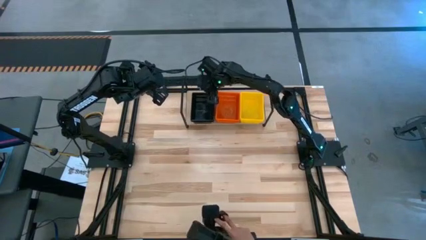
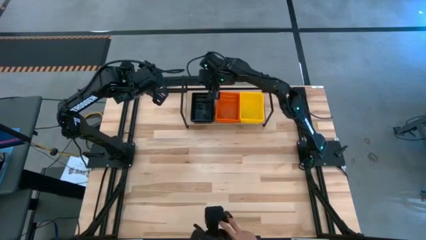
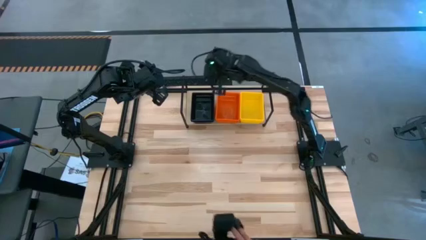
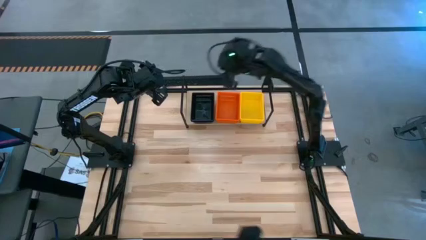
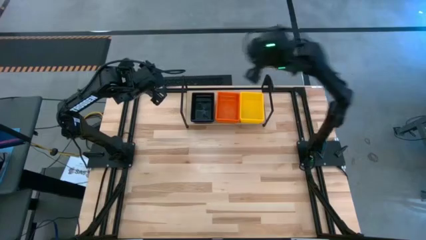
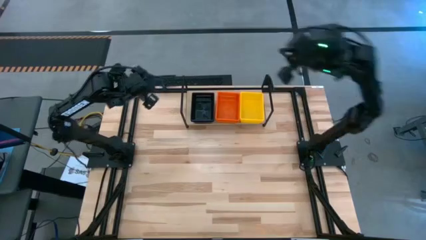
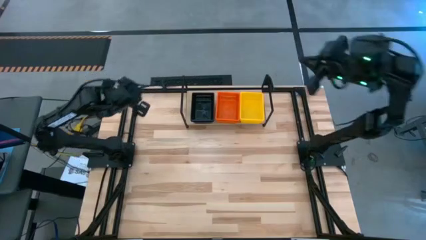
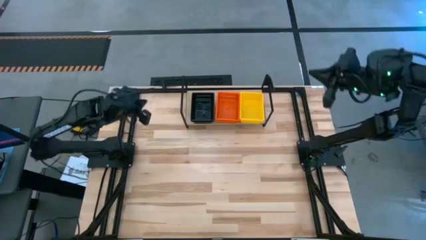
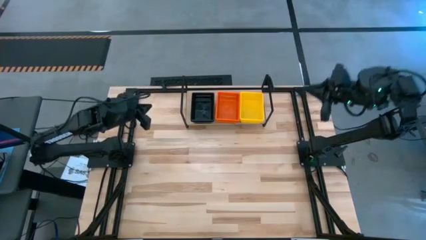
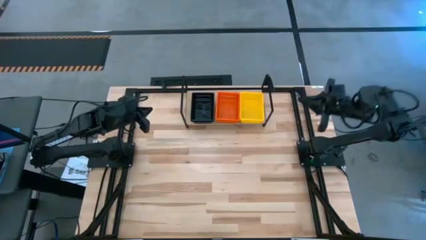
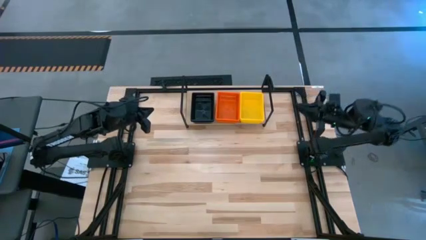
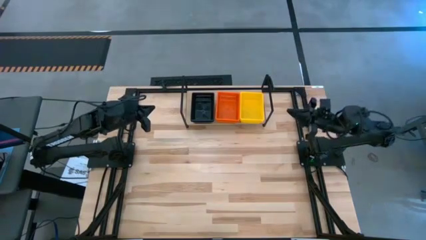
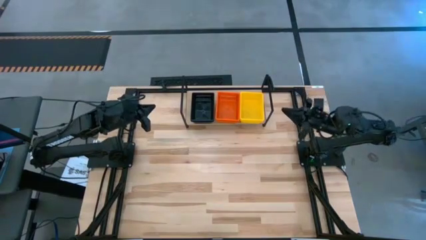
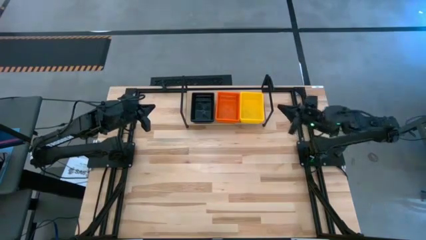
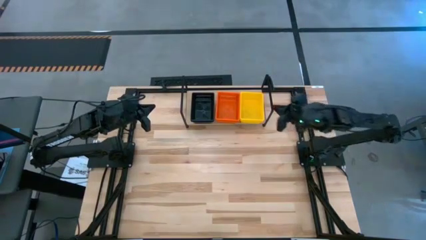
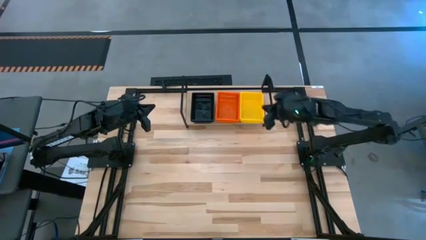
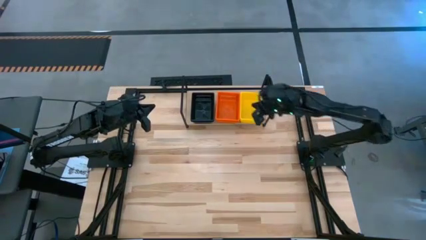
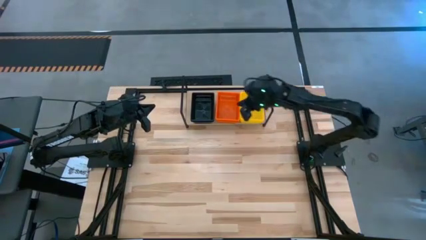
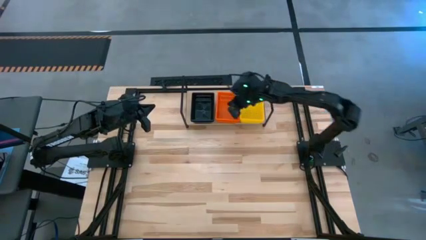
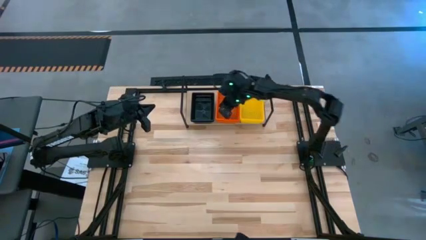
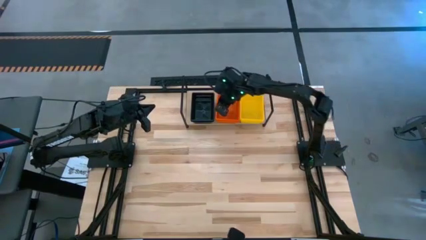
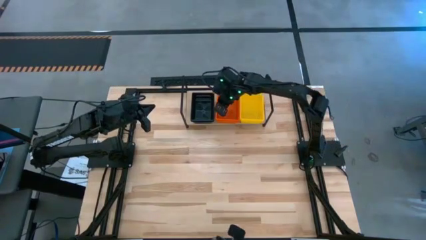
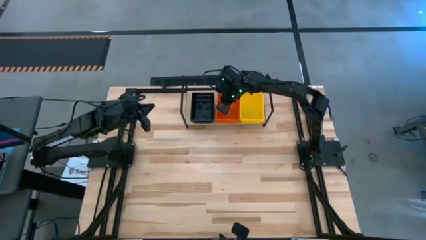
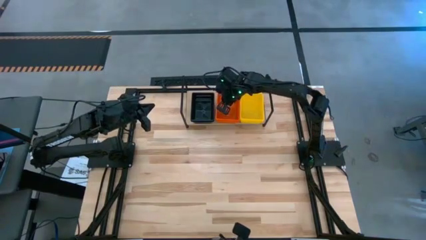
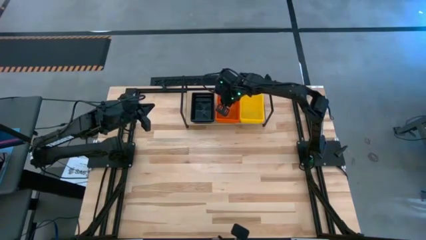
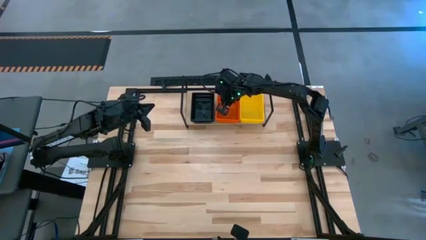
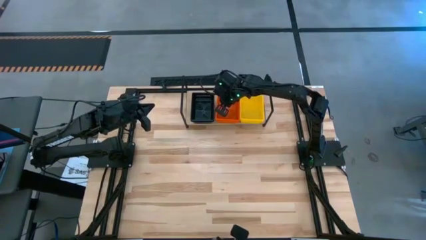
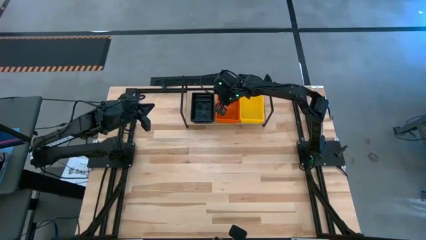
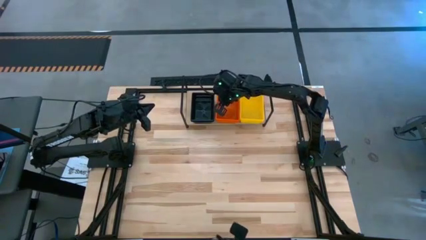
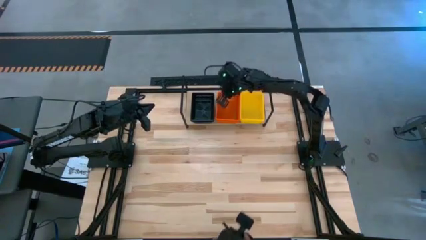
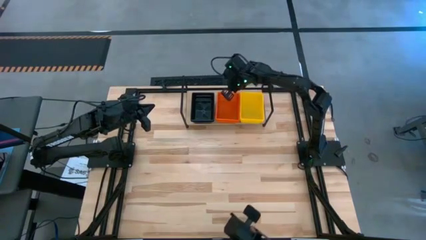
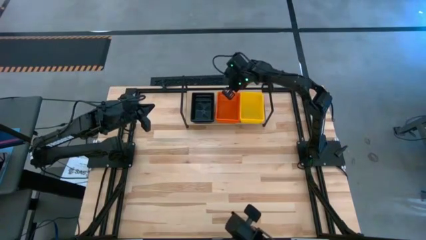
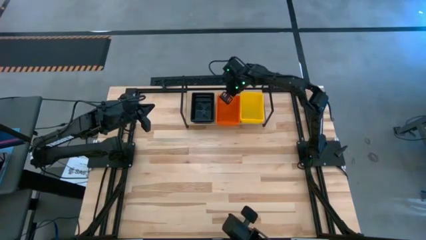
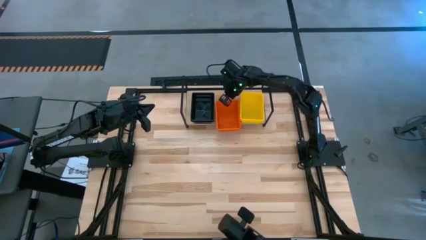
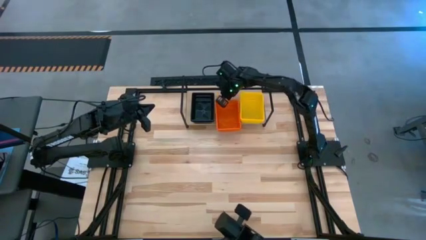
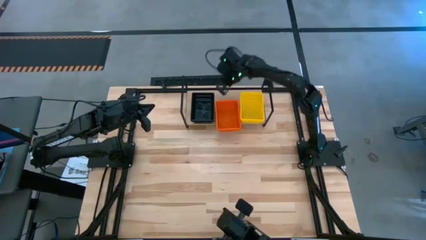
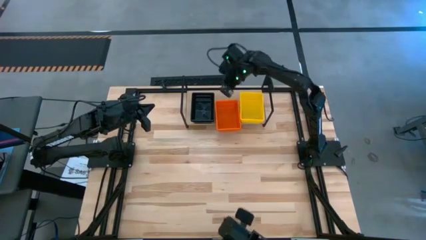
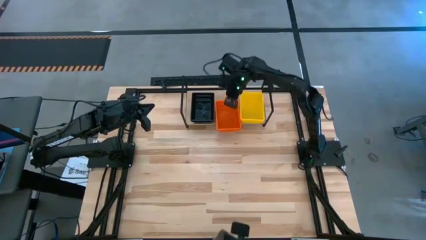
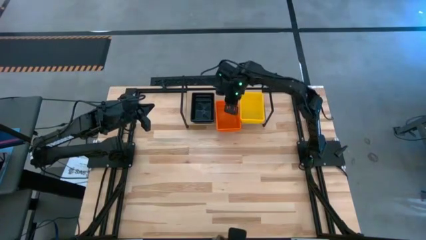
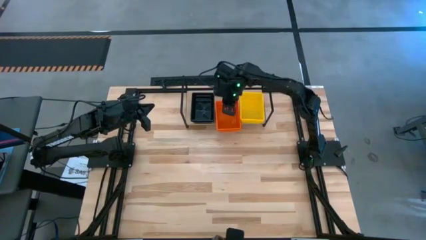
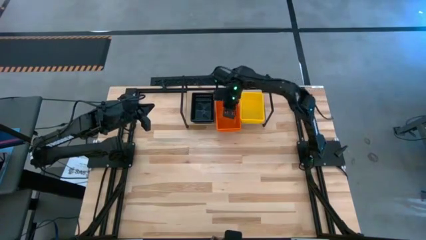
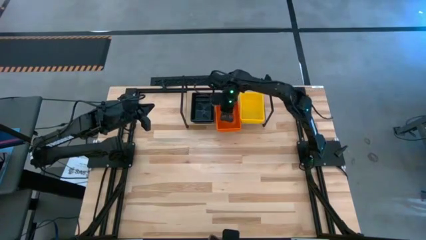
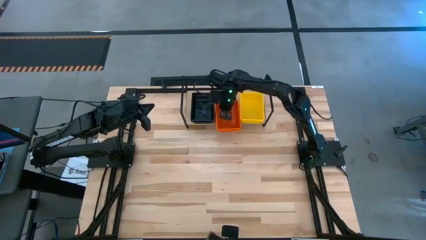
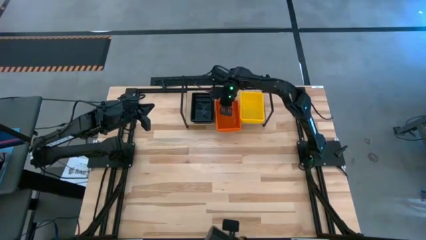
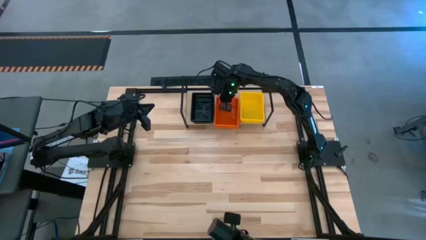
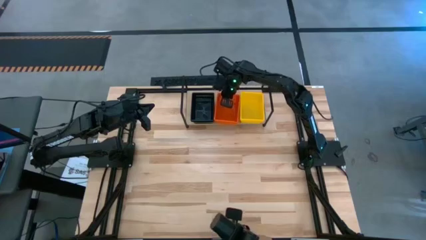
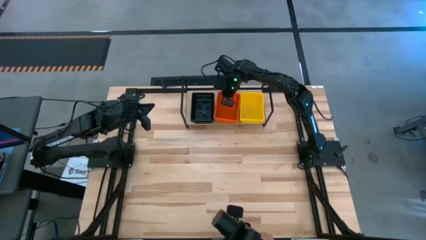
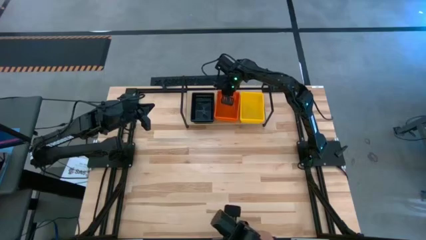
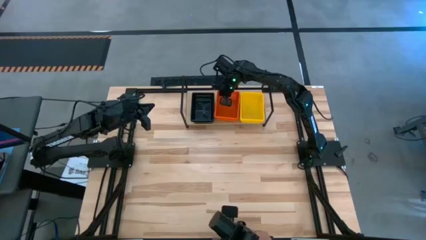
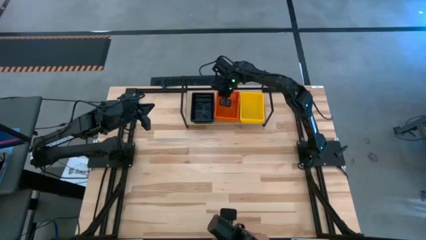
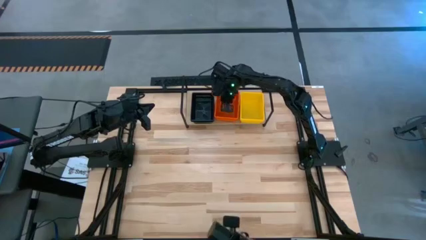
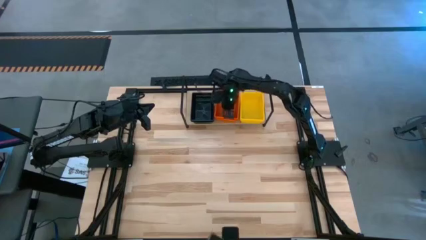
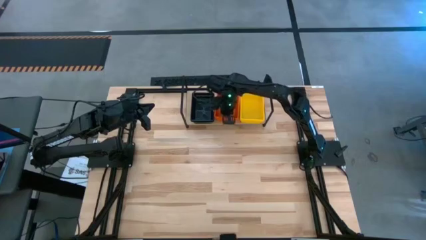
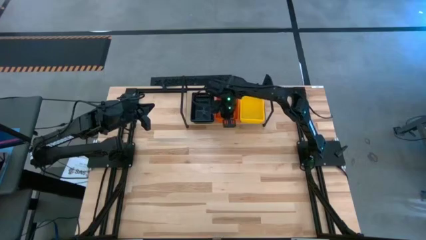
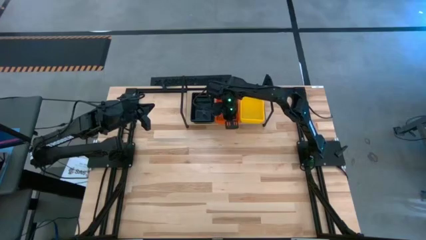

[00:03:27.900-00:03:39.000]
Task: Stack baskets on shelf by color
Adjust the stacked orange bins

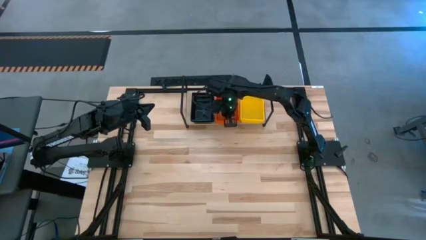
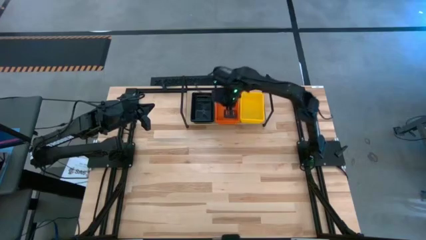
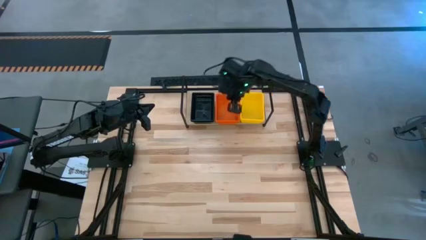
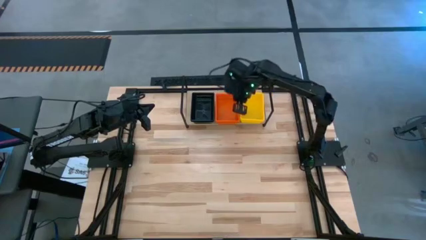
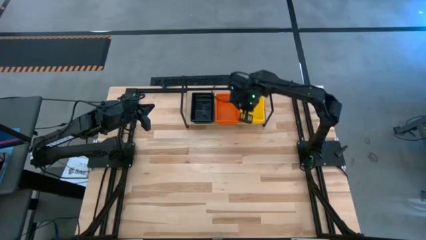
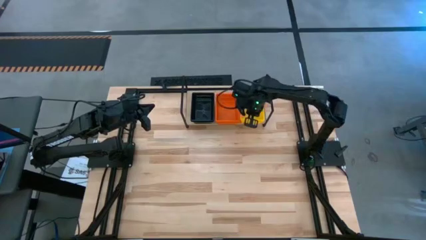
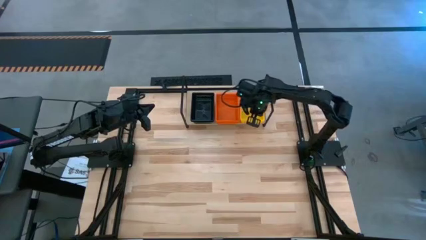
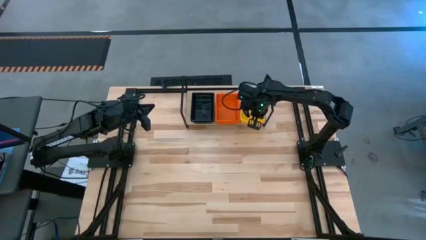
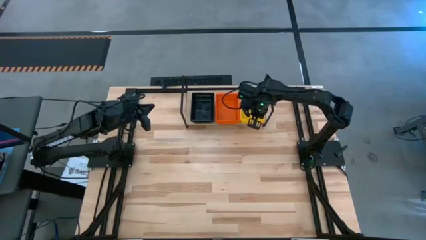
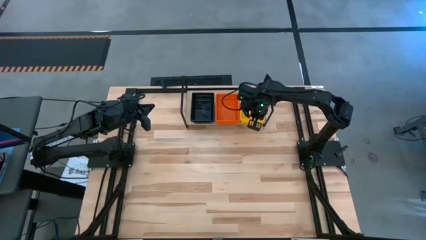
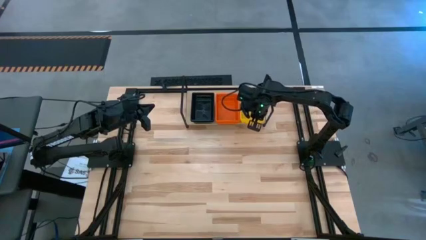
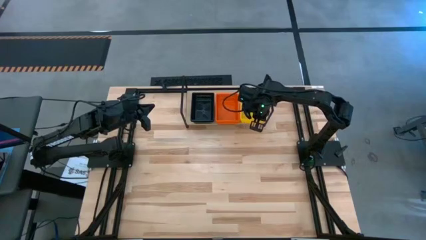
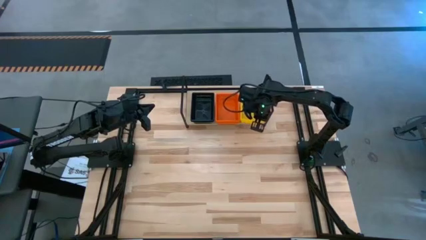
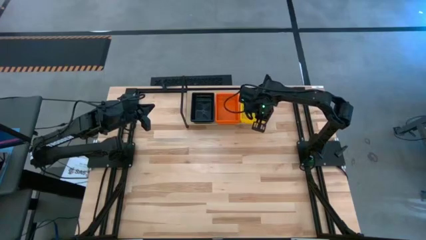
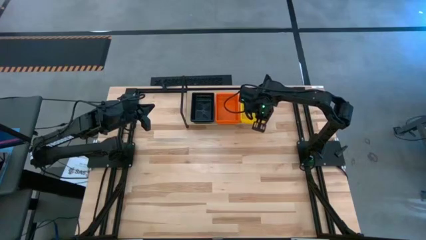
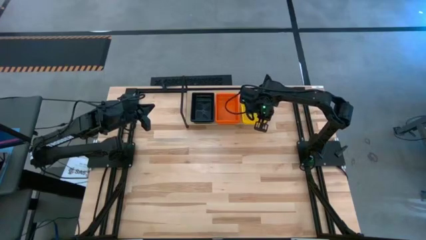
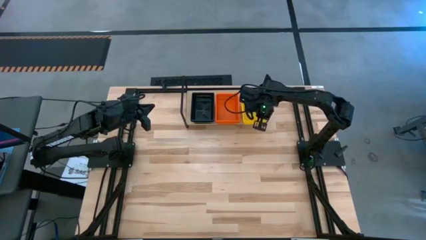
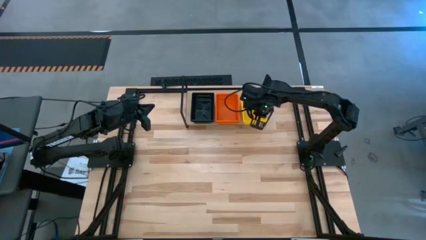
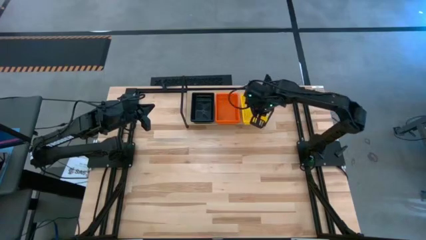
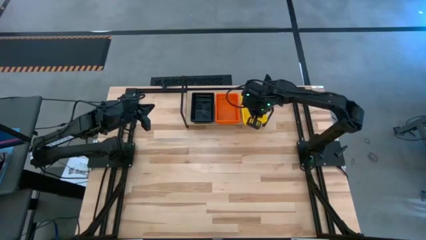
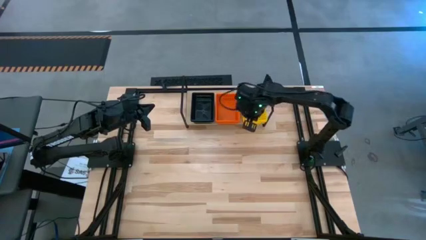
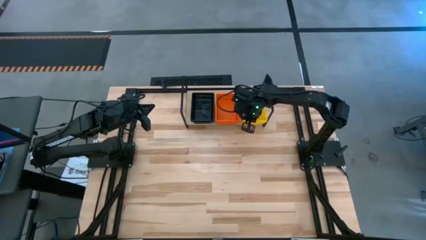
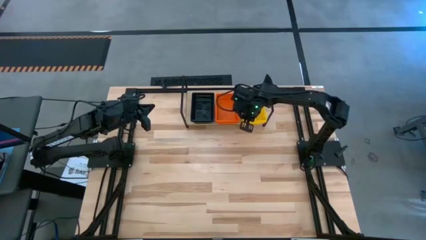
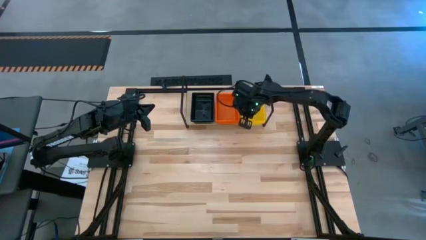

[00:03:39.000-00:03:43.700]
Adjust the stacked yellow bins
